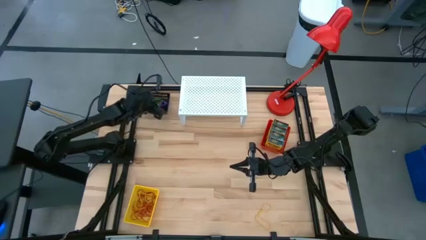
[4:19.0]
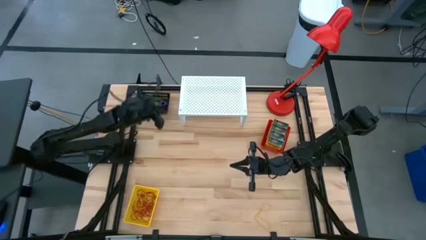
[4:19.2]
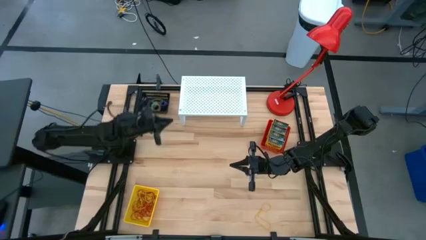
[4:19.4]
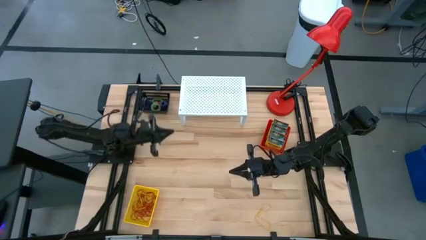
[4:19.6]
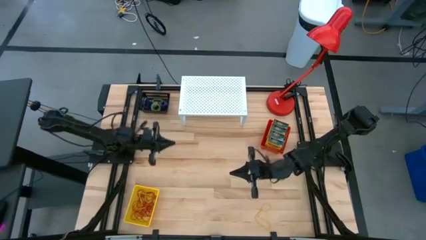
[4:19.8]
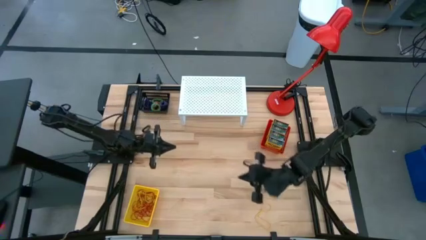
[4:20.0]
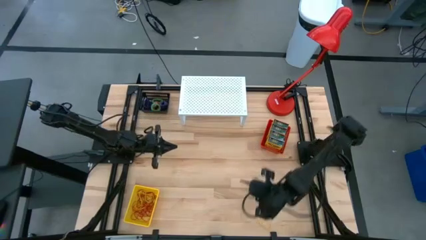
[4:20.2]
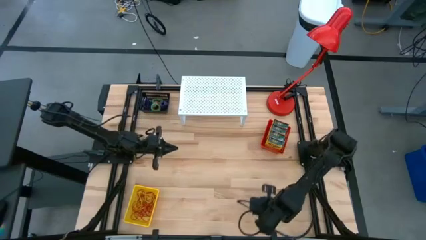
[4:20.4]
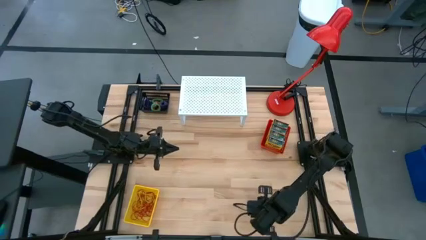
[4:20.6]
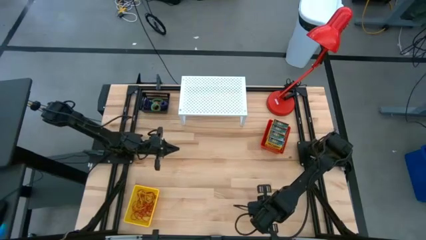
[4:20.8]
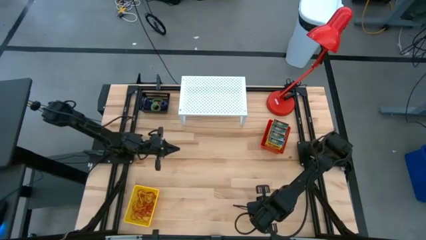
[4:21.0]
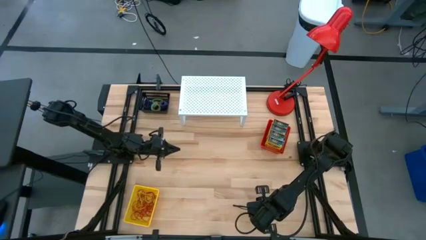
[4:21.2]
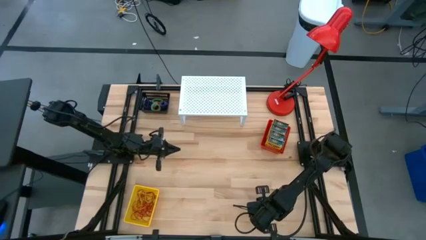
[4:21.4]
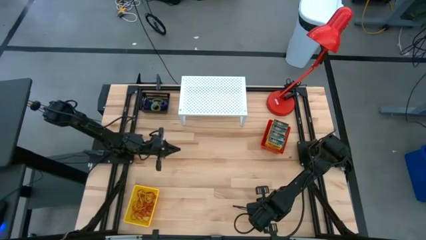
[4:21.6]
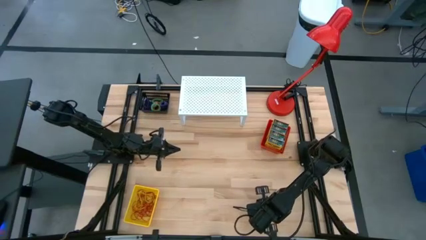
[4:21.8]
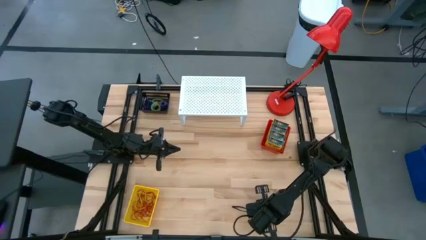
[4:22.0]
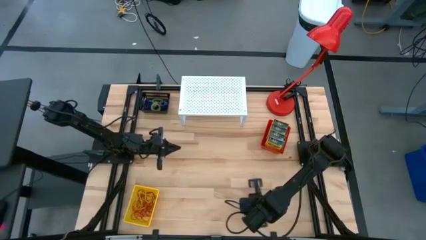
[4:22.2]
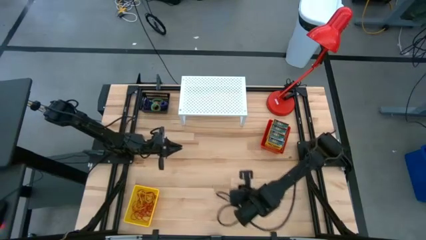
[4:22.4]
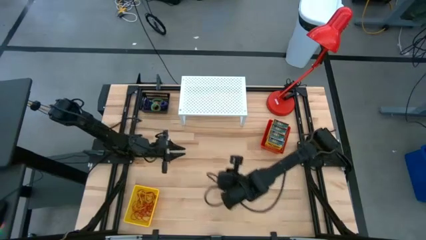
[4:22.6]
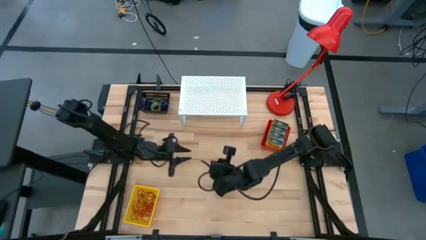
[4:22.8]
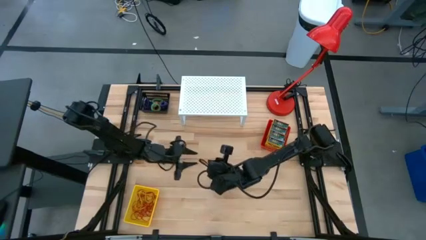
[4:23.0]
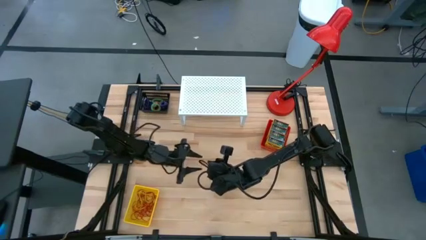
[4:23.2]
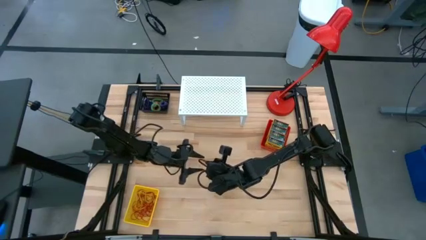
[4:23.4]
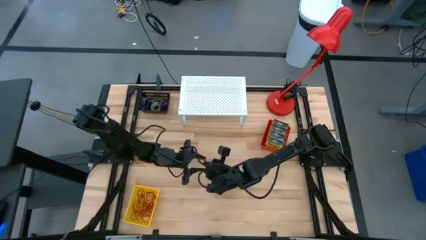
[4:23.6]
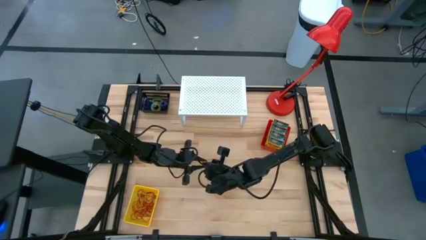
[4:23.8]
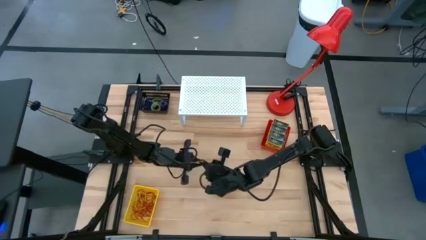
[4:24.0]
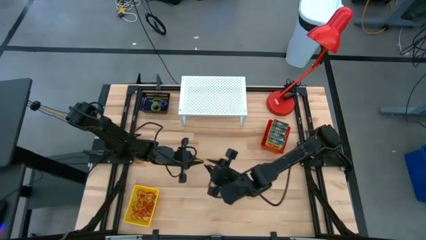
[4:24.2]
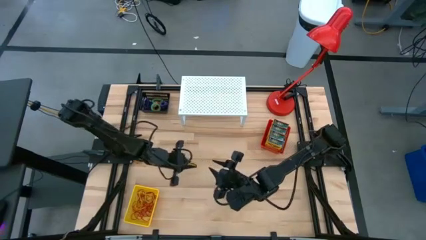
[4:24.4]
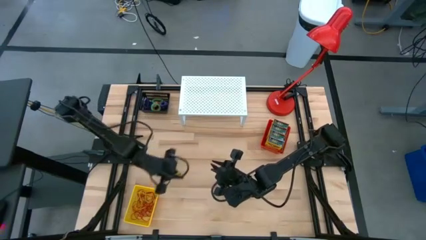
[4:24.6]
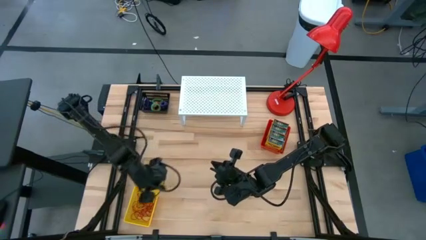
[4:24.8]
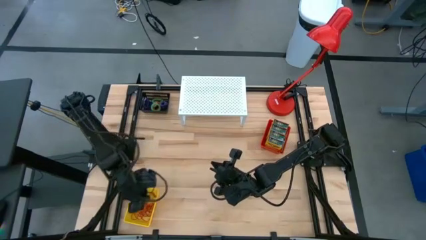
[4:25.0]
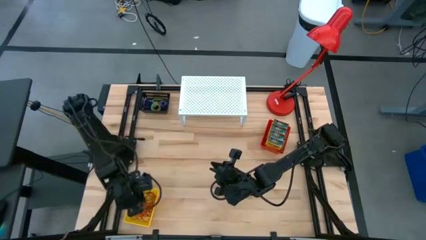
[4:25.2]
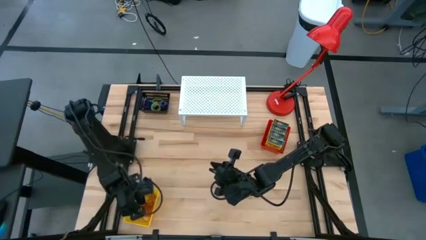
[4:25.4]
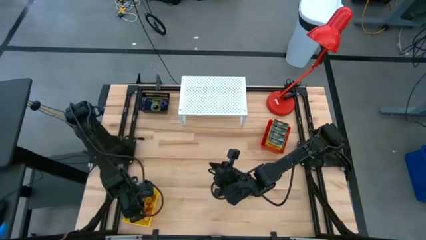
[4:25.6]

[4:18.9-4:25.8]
Task: Pick & Place Office Desk Supplies
Put the yellow rubber band into the yellow bin

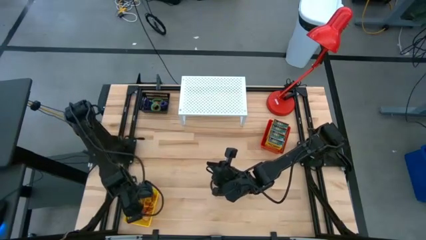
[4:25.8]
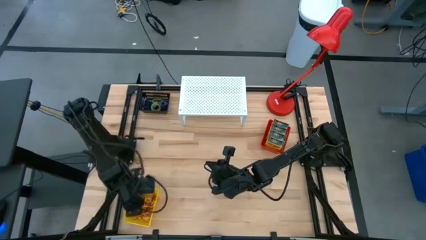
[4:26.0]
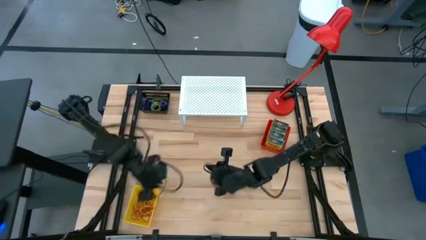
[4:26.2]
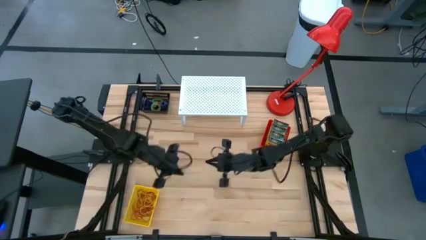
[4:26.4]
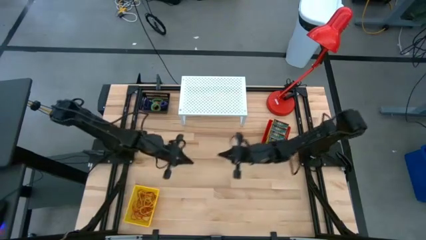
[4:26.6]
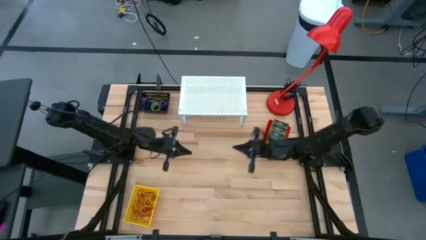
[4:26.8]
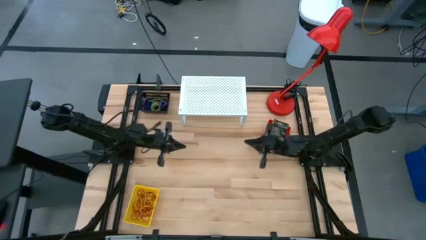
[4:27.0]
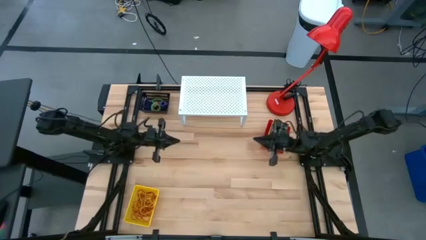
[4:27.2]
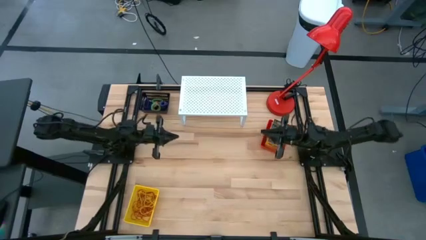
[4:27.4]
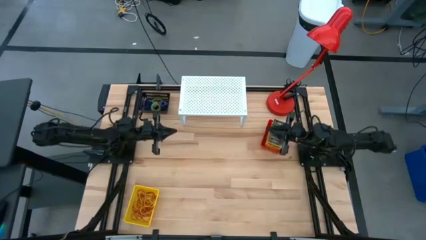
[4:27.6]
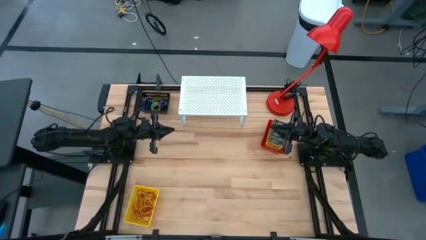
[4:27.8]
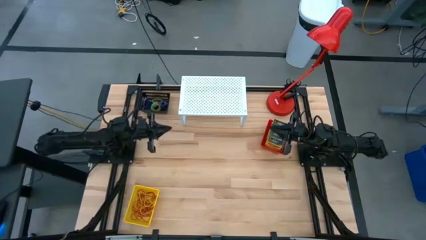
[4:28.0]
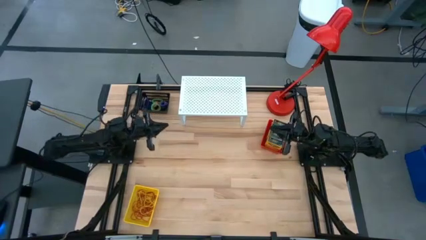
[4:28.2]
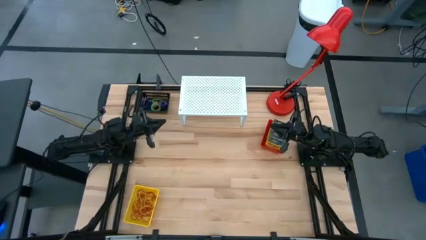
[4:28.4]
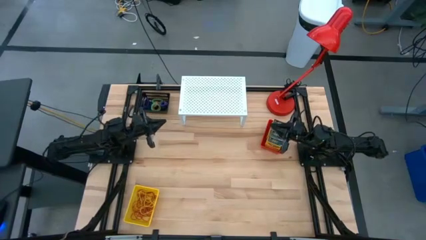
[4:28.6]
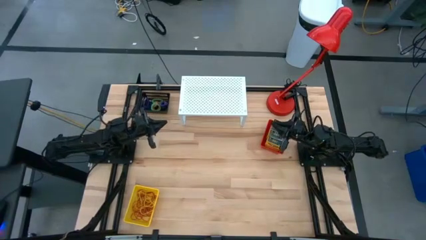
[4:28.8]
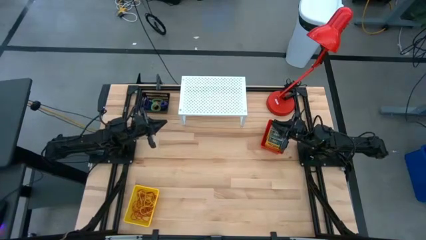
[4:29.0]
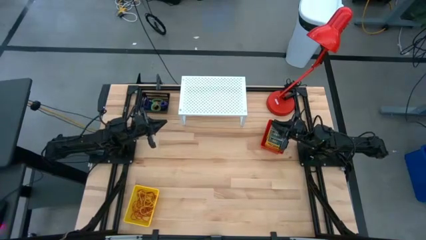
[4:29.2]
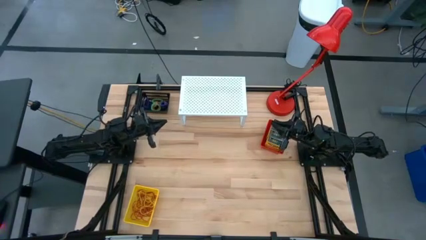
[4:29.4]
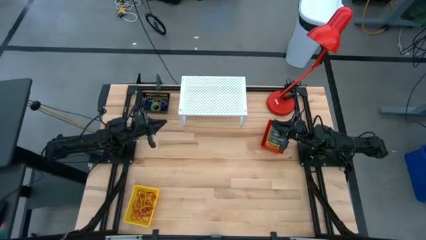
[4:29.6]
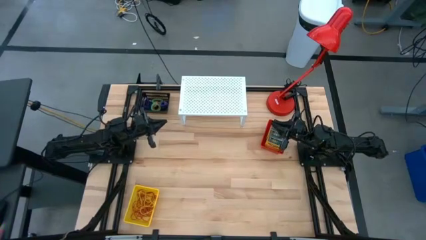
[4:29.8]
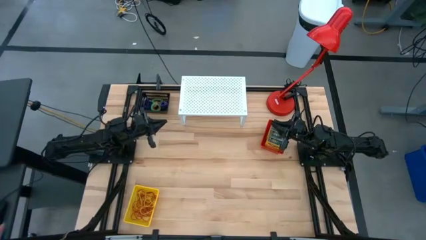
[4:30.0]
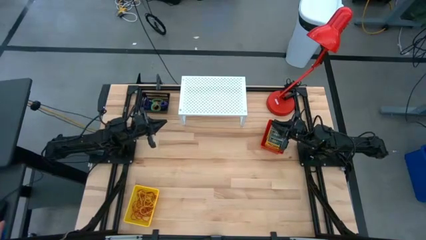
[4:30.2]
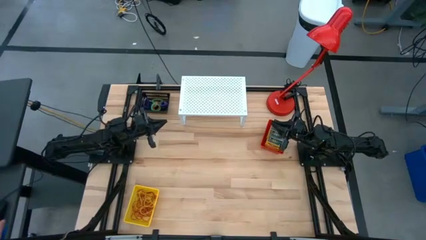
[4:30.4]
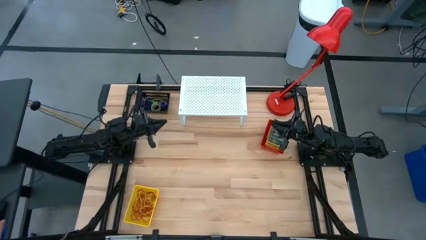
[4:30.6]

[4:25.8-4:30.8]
Return to Home Position

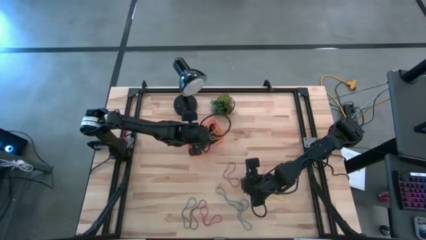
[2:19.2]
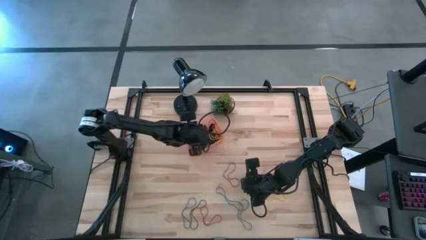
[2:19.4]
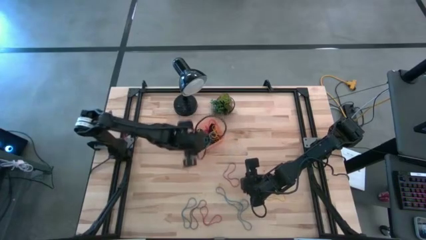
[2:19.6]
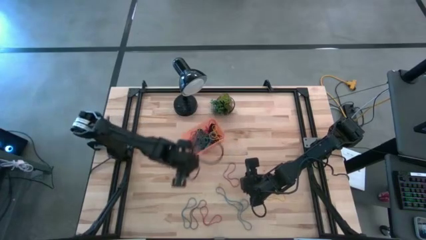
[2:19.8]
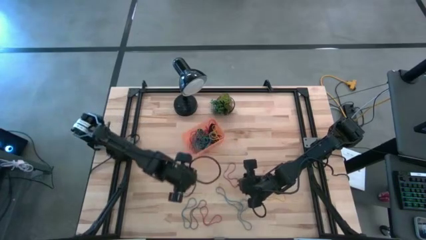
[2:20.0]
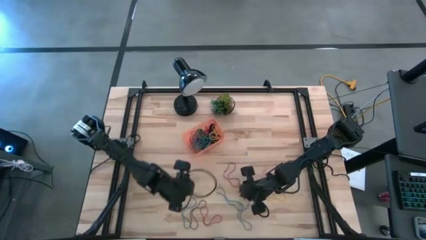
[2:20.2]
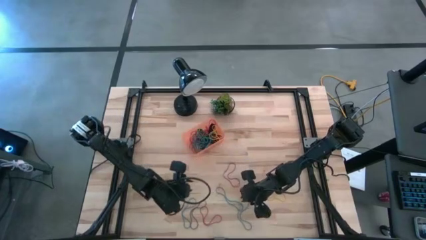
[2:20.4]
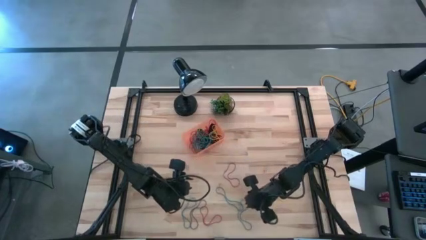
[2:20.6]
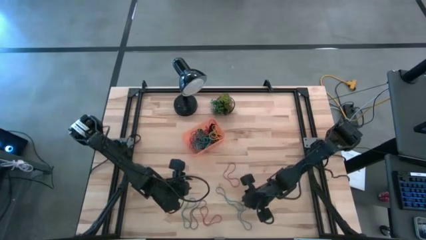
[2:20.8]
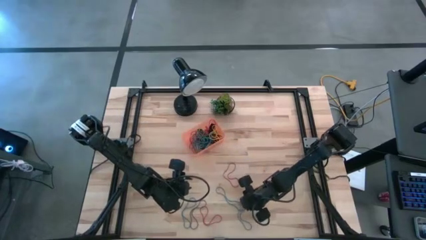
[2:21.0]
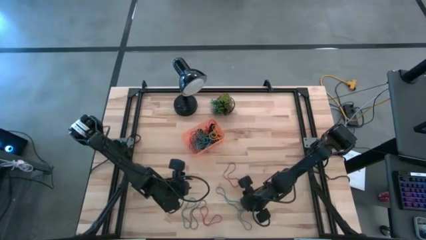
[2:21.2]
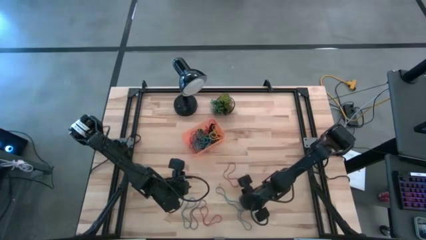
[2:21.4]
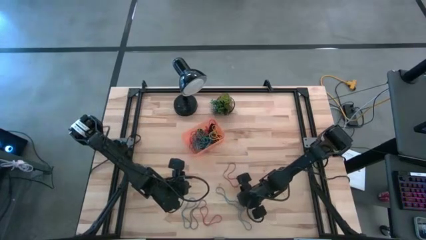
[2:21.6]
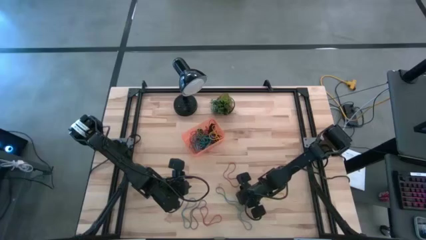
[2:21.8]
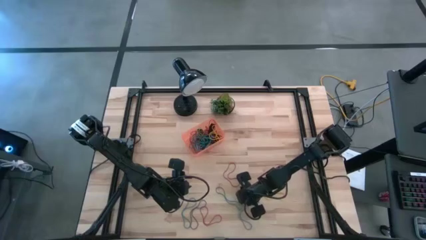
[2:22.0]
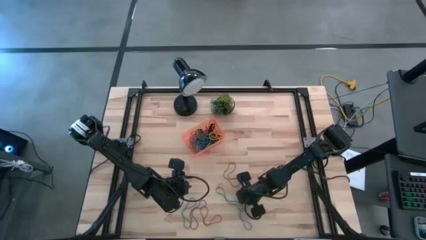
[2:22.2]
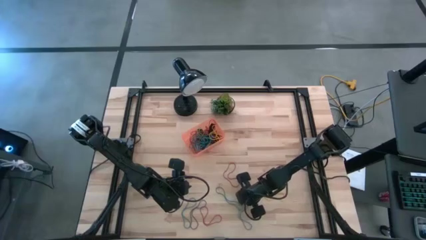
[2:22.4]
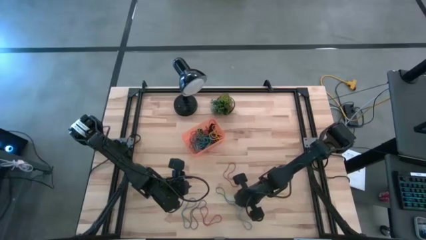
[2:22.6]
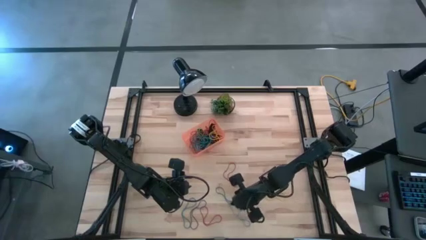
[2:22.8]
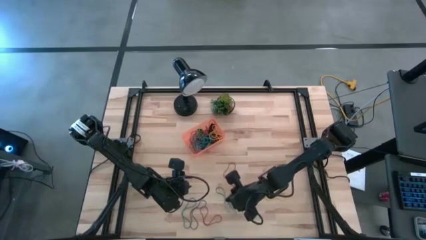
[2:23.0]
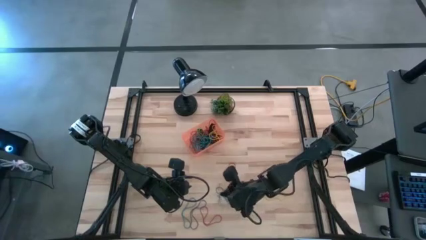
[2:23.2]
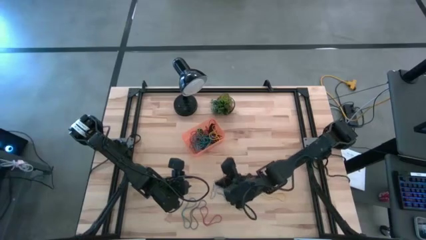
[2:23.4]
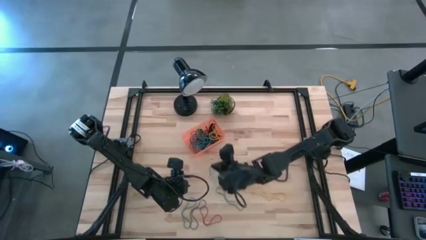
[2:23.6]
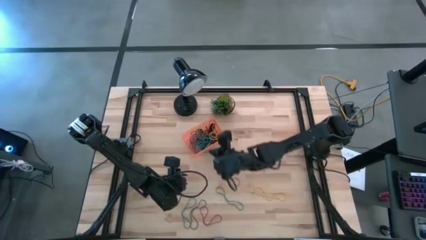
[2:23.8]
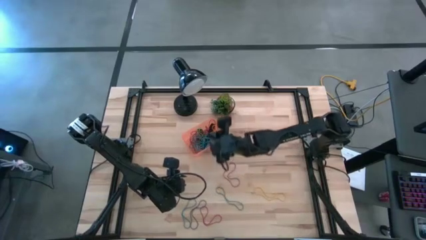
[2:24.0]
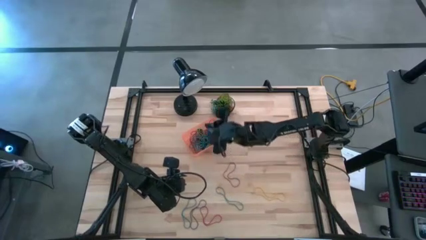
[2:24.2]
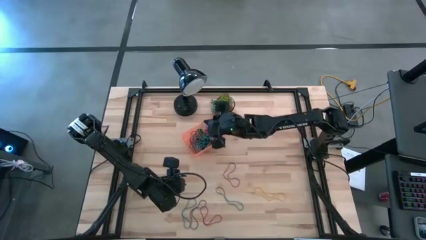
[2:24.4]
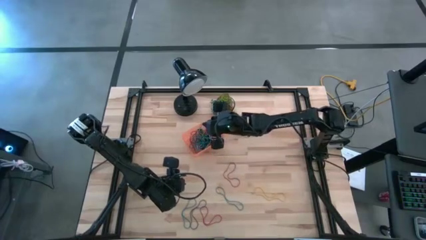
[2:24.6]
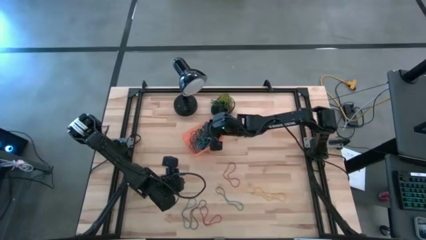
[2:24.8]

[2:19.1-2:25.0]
Task: Pick and place rubber bands into bin
Put the blue rubberband into the orange bin
